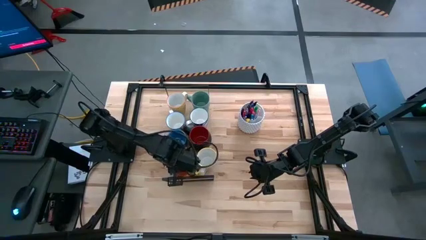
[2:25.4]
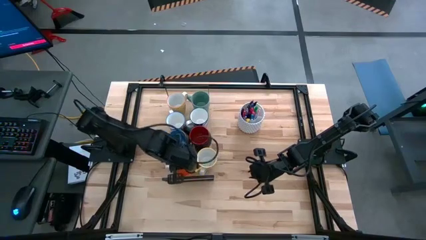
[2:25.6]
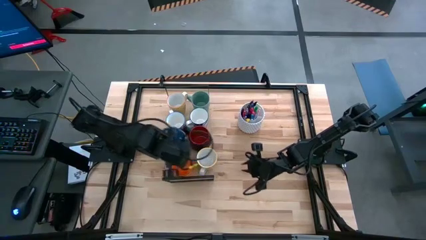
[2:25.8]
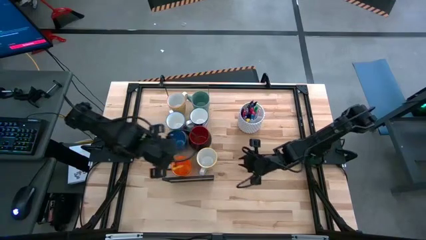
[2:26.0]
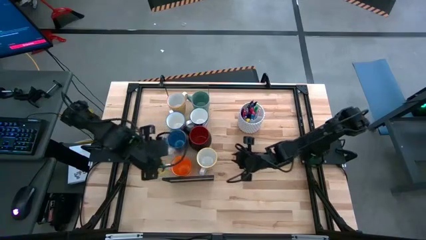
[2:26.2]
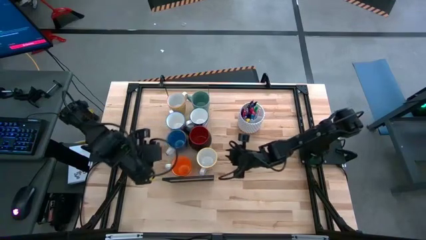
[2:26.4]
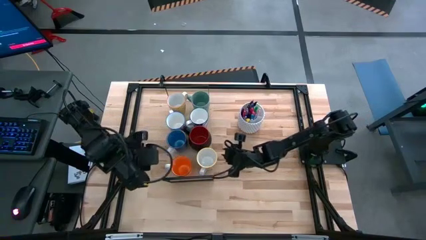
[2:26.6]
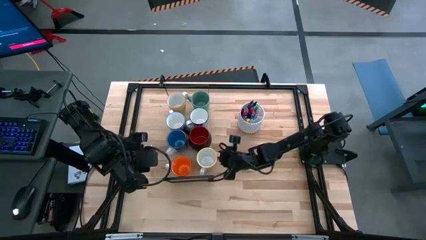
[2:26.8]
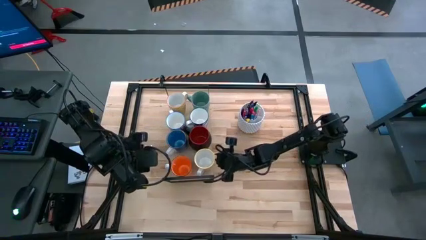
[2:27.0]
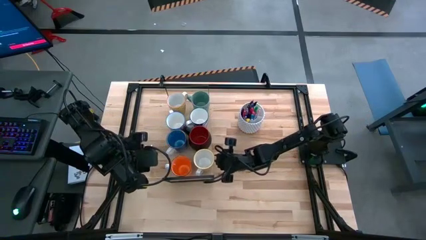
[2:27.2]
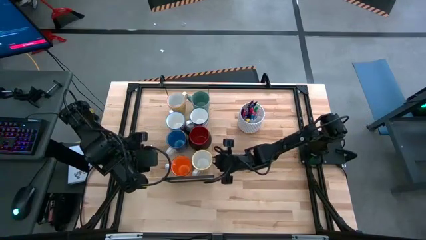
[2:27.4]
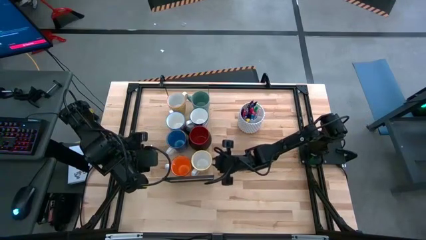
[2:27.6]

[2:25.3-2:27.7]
Task: Place coffee mugs
Adjust the orange patterned mug on the shelf

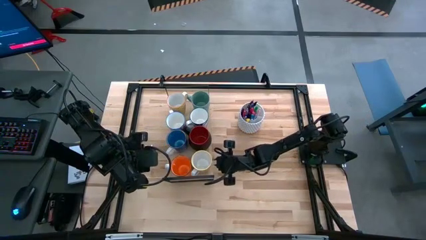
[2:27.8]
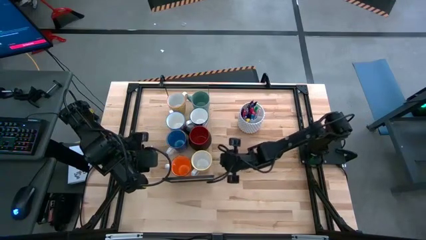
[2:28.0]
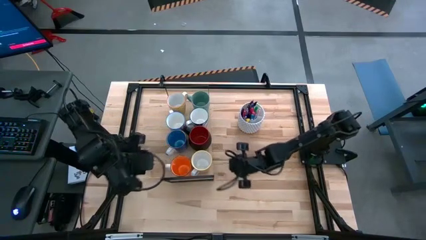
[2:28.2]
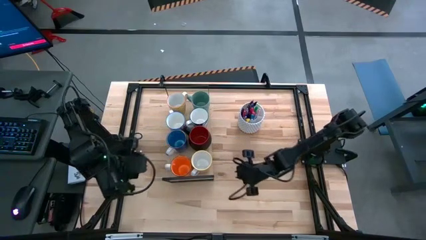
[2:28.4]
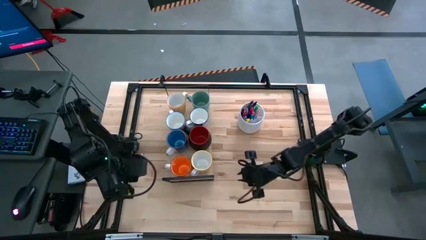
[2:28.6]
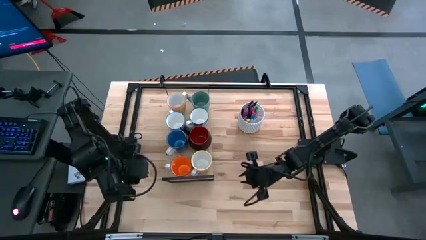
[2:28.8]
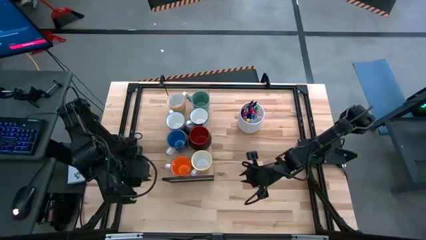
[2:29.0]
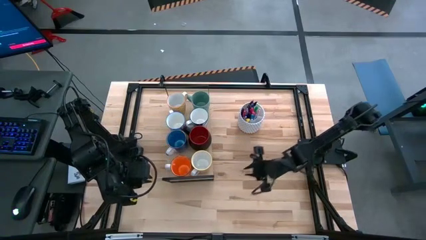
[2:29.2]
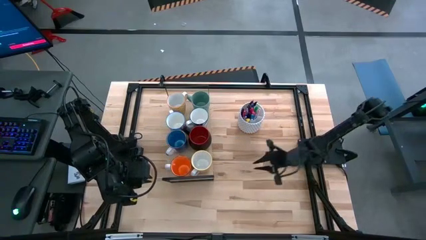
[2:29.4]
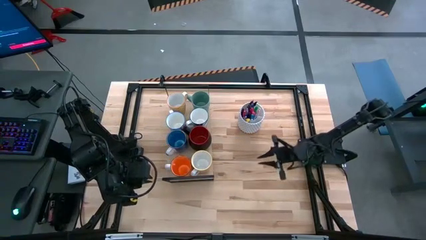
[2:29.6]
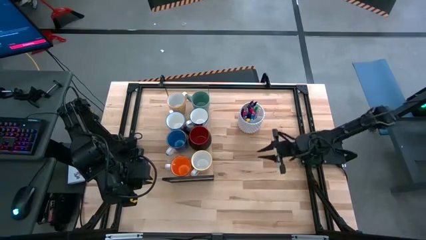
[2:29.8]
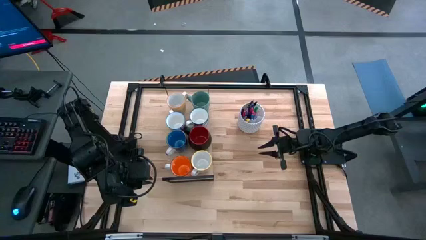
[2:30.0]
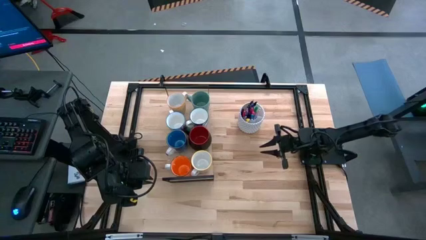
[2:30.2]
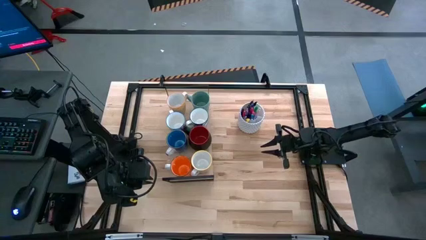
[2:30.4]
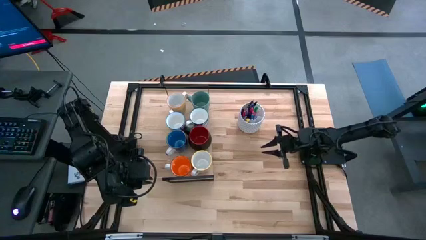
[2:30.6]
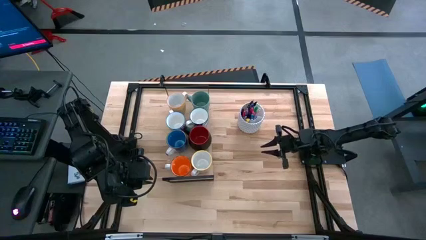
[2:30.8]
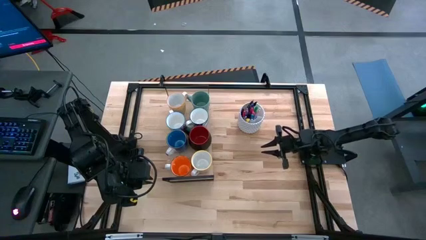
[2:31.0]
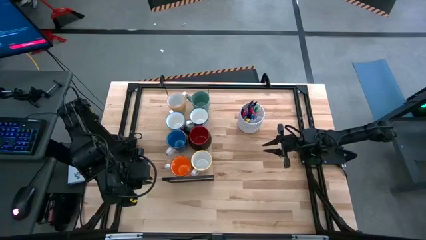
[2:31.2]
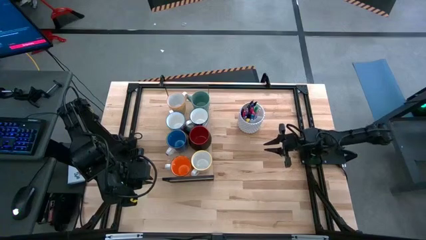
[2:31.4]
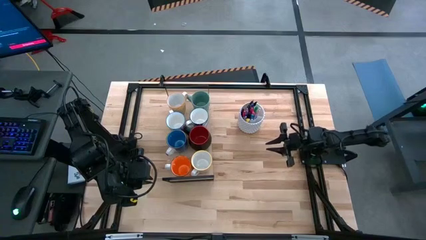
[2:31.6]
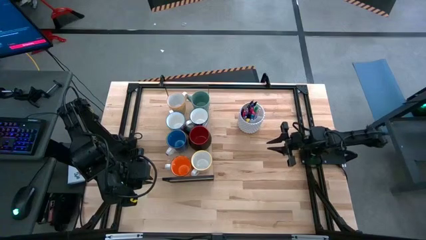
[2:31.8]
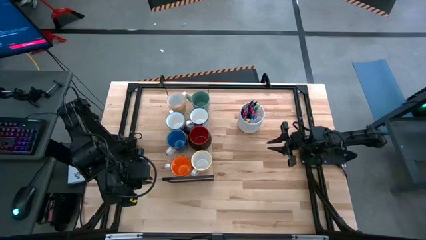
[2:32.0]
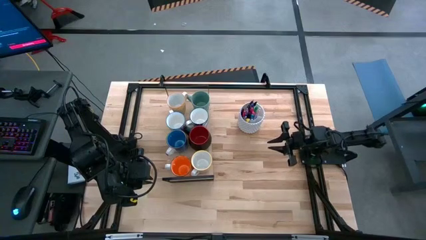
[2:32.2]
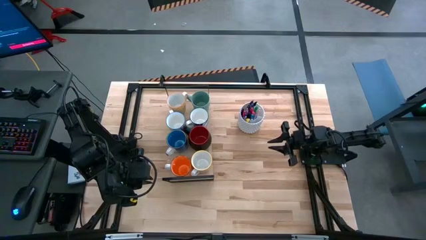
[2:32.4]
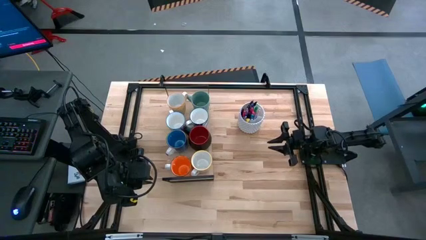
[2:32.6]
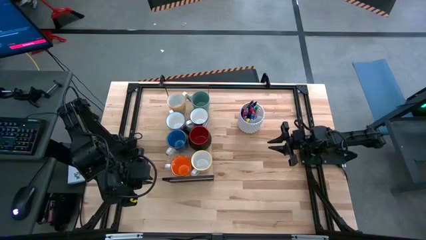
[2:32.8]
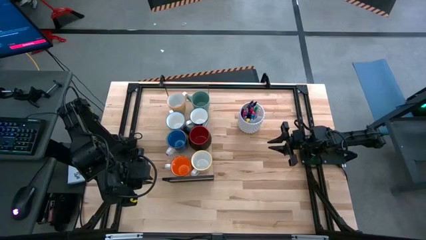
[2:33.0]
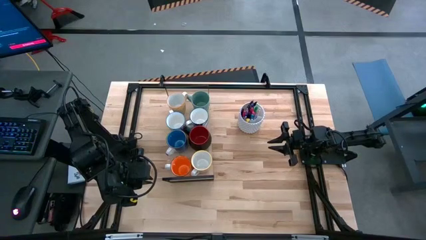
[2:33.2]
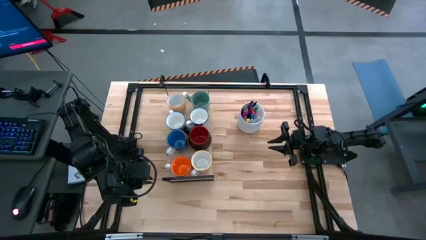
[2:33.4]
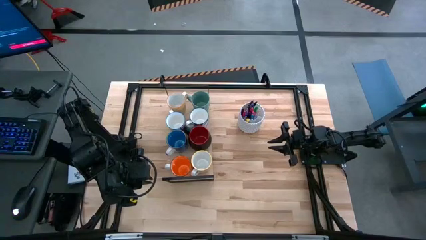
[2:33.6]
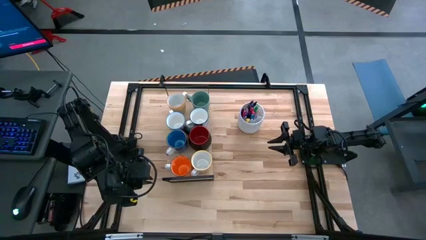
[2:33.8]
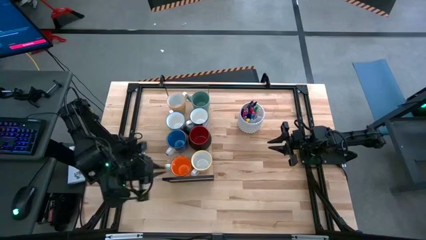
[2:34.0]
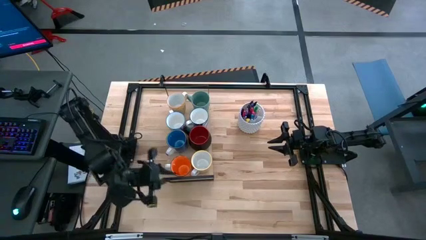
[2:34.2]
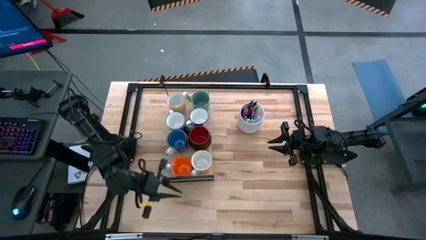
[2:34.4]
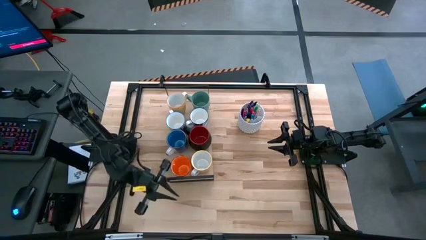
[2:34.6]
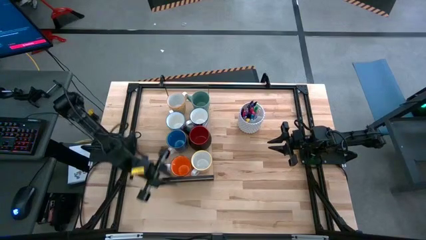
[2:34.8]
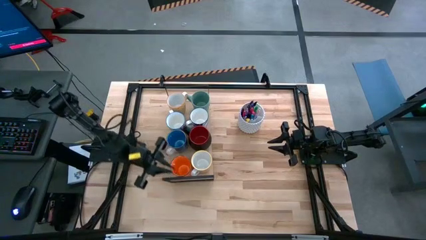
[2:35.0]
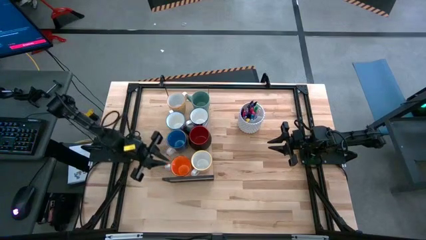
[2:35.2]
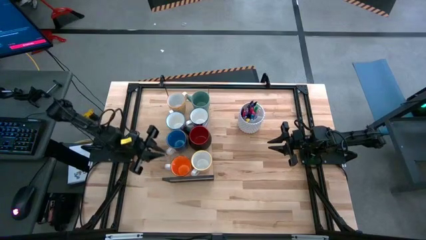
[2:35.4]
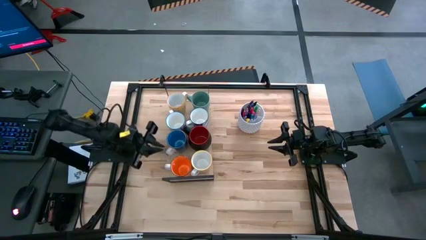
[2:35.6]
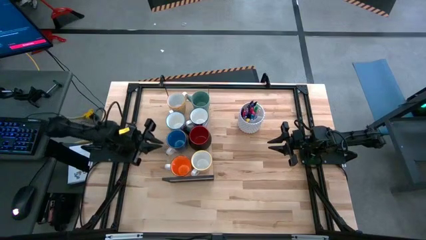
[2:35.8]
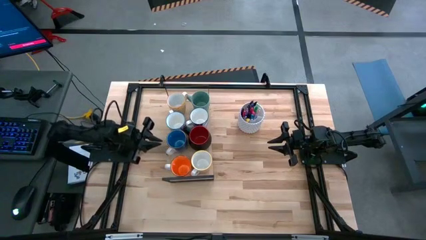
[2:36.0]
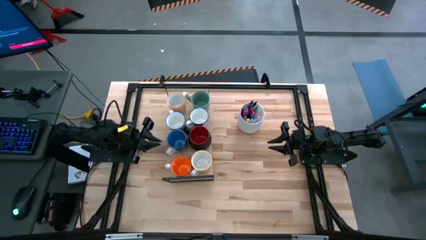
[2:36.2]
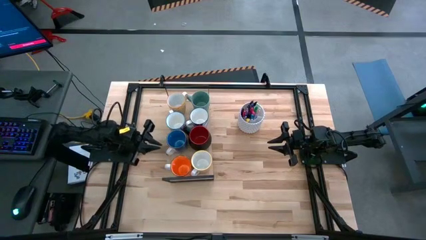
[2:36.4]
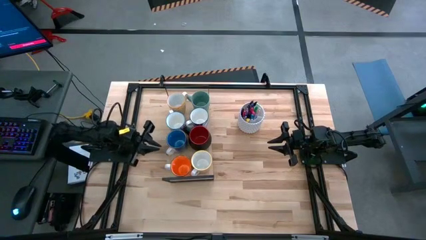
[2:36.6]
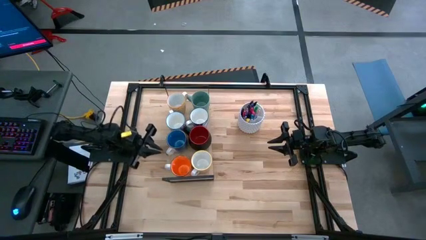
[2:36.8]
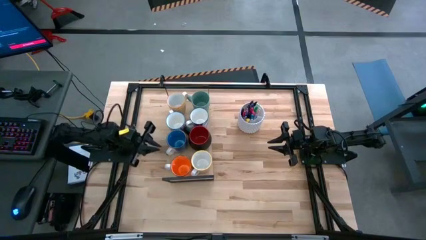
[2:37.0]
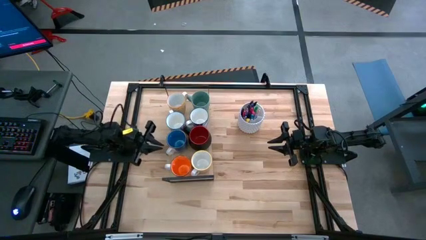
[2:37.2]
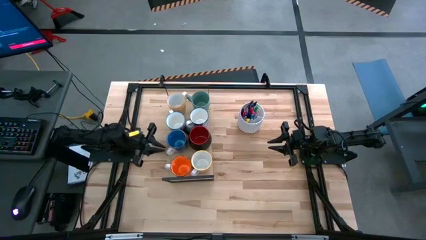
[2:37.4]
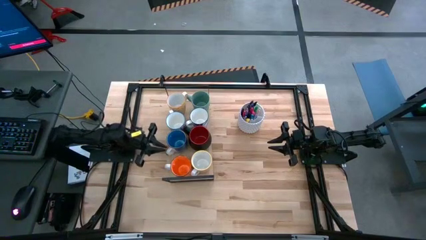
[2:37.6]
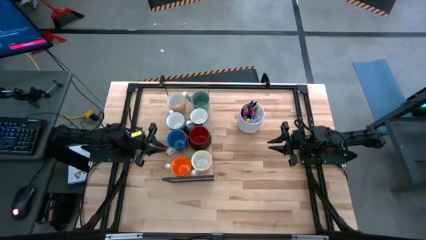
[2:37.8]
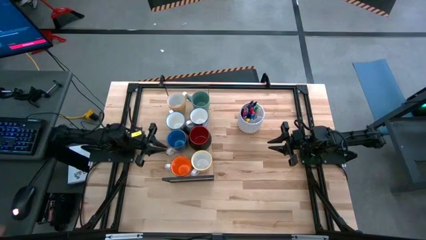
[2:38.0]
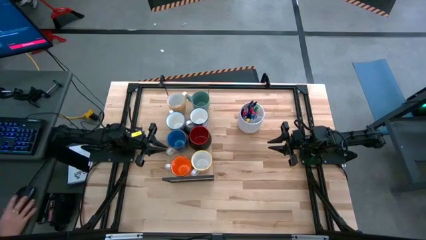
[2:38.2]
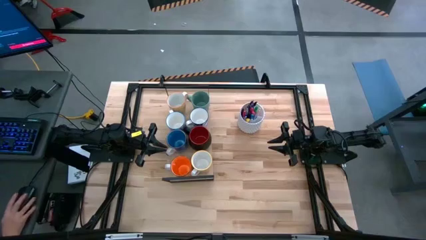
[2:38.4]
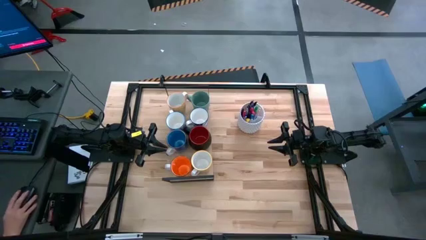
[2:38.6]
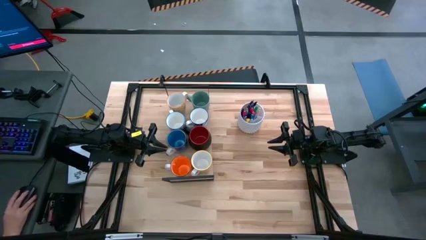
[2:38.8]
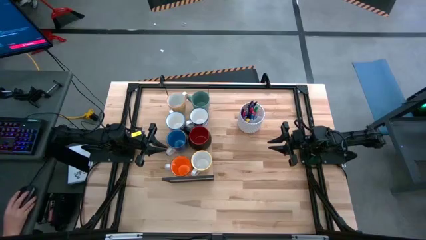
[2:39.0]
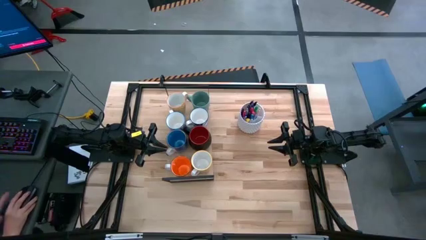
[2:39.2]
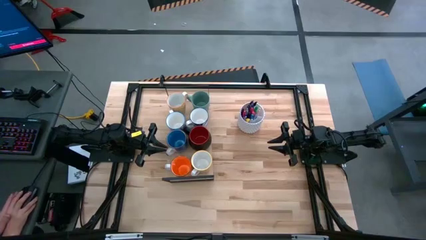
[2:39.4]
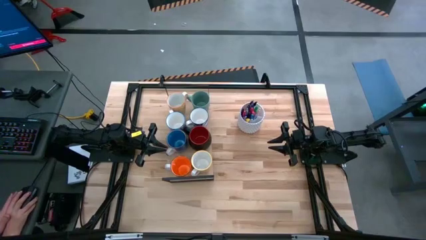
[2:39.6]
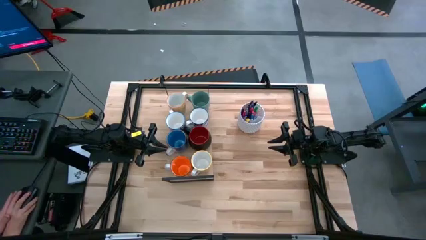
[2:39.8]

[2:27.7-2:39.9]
Return to Home Position

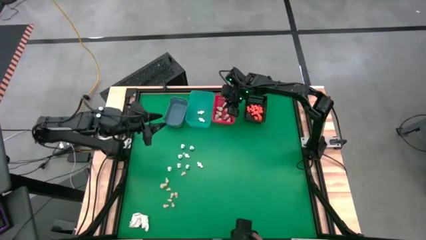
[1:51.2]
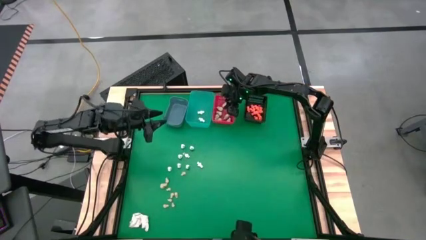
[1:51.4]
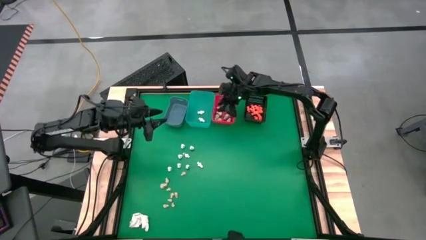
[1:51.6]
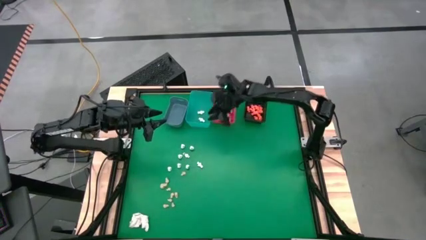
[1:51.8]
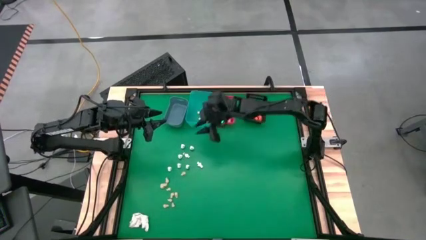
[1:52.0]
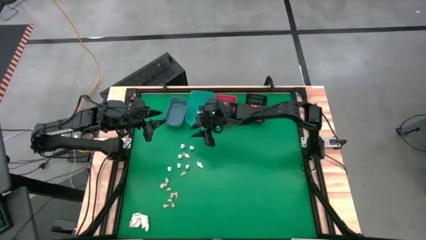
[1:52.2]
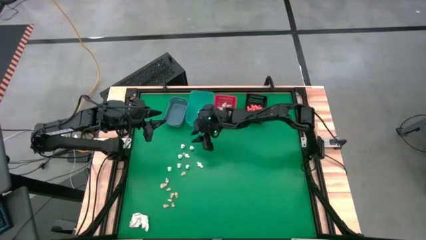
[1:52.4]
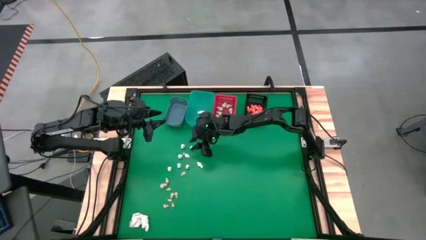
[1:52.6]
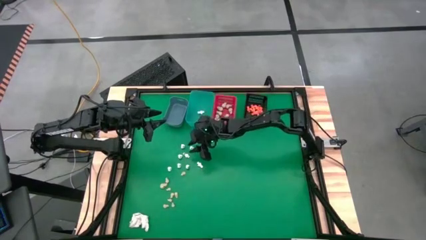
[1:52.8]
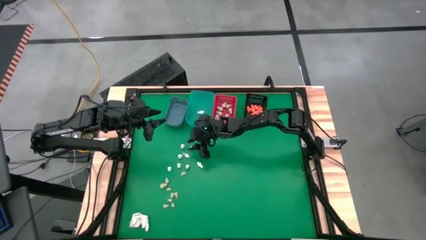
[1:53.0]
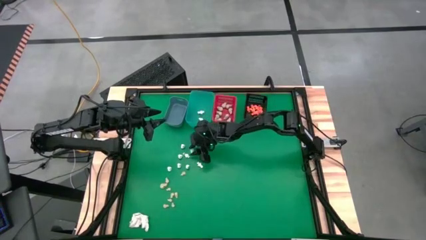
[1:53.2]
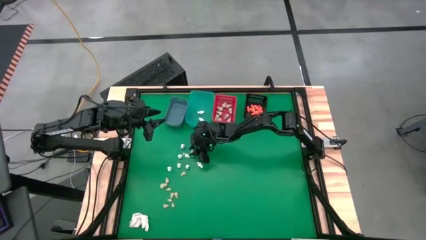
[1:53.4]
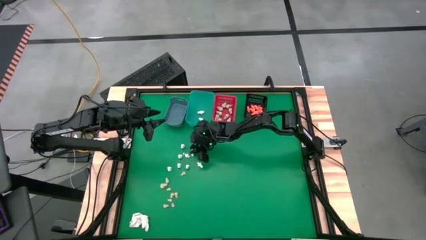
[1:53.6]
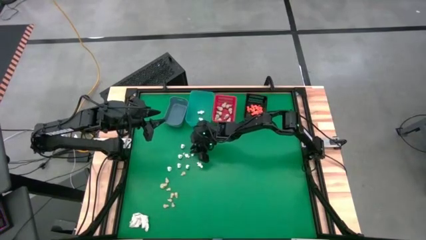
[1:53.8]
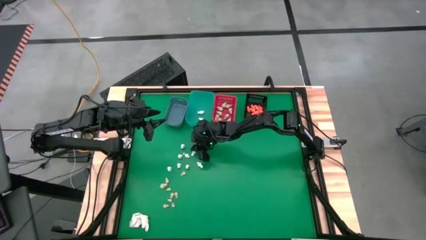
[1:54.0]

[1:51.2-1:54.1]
Task: Sort Halloween decoration
Put the white skeleton toy into the light blue bin
